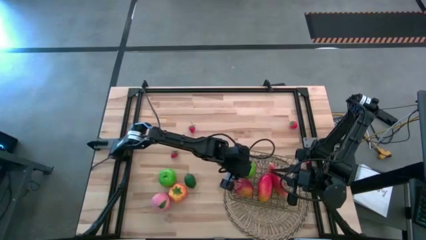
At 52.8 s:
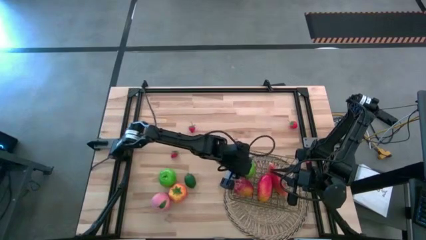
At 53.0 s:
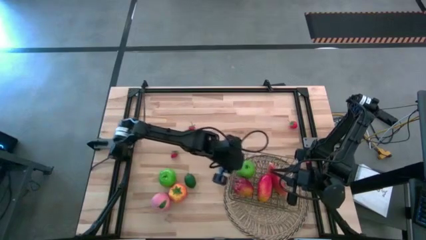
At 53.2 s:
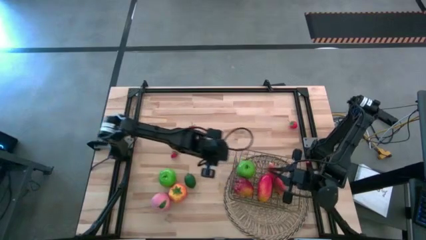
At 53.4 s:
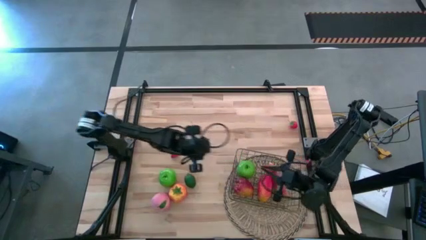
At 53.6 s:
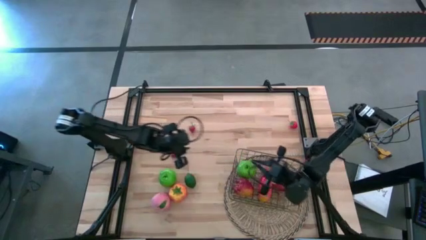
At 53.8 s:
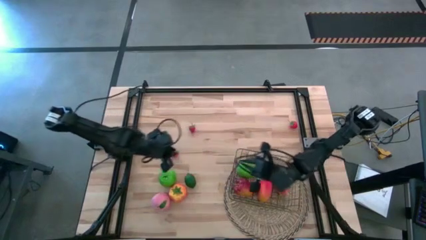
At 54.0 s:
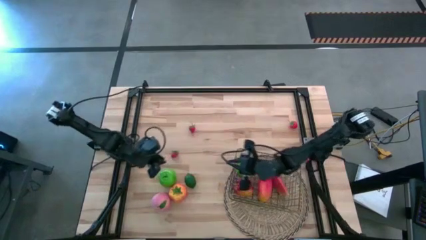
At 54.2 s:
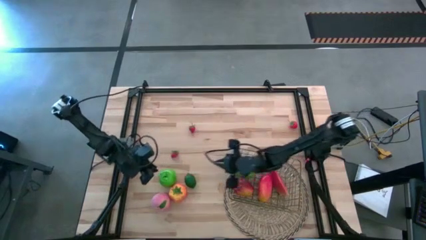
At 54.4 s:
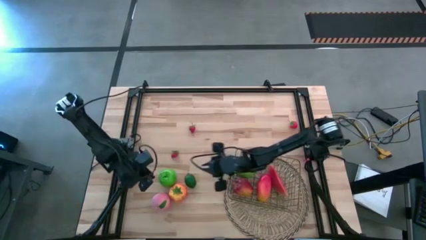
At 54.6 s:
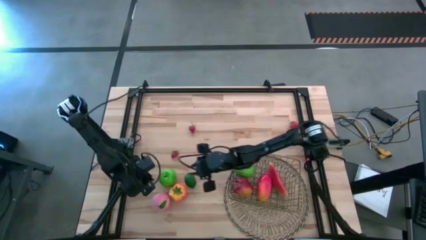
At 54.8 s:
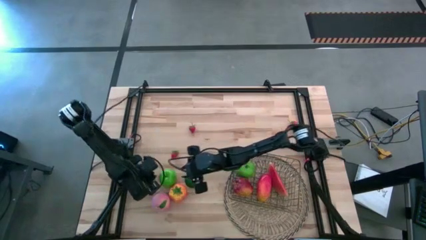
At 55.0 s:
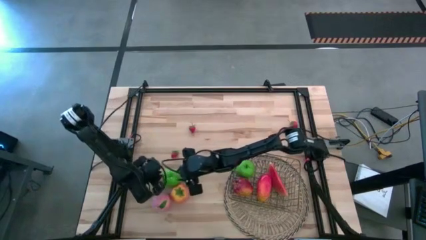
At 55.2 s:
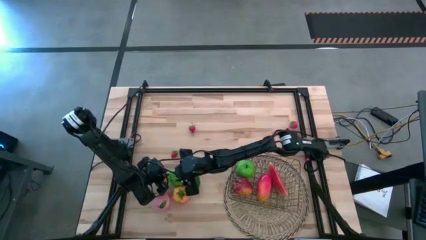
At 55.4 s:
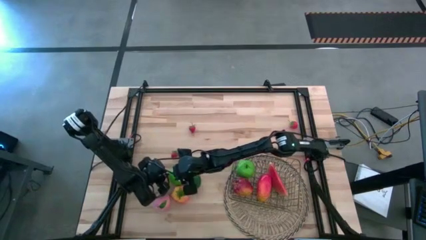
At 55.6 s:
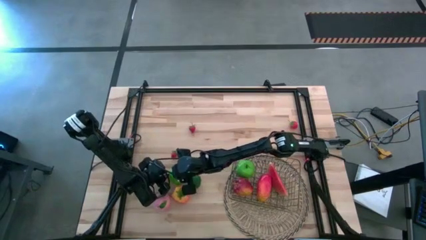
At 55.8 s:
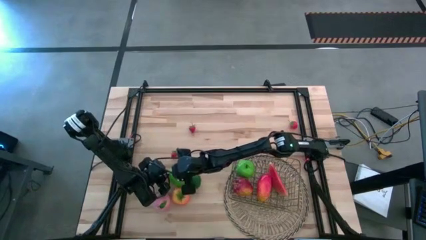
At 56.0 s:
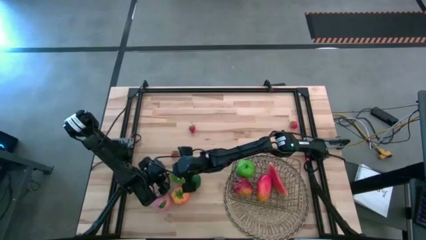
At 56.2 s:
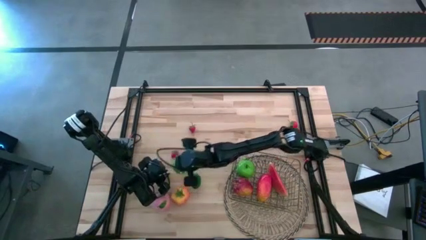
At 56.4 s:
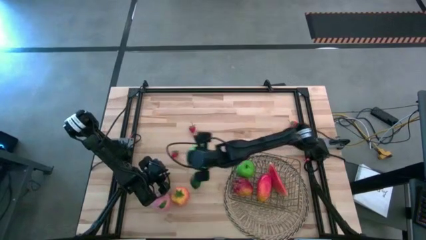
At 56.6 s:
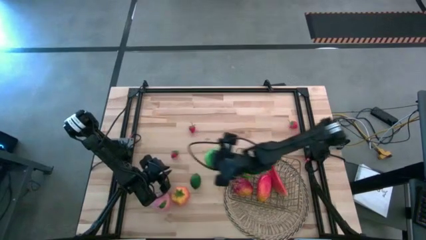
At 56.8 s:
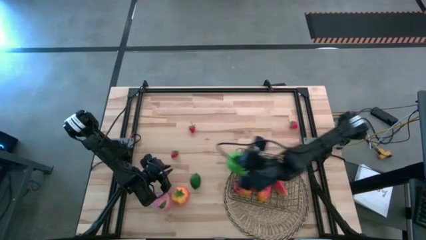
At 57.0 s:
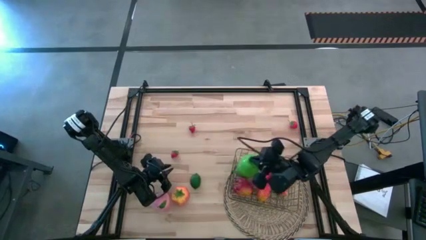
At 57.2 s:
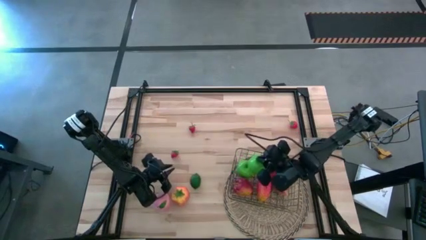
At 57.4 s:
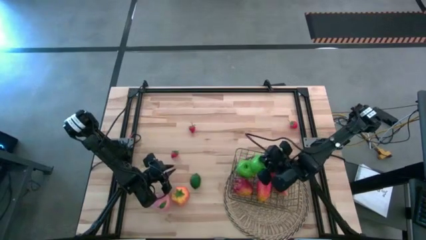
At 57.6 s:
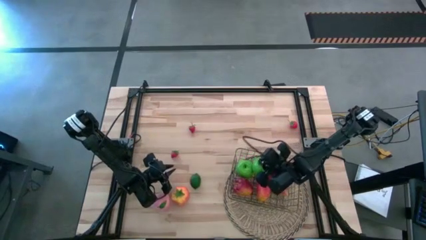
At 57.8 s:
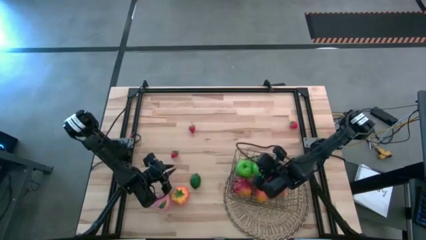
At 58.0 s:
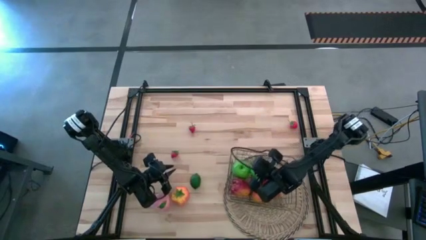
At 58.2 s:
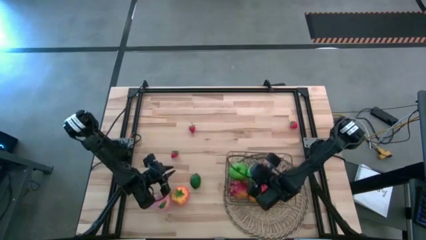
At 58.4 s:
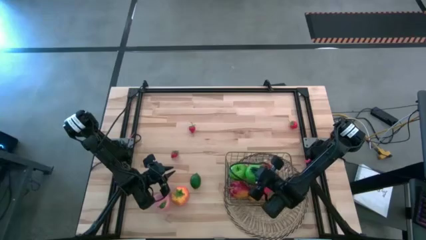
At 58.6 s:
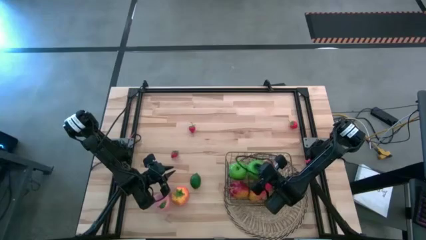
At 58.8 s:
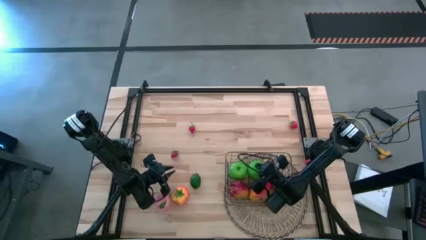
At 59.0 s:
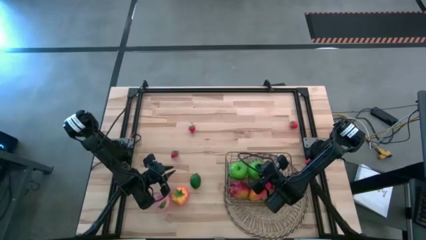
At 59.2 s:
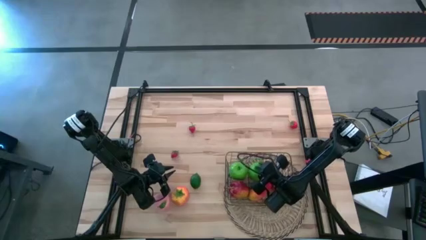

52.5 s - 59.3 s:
Task: Build produce basket
Put the green apple into the wire basket

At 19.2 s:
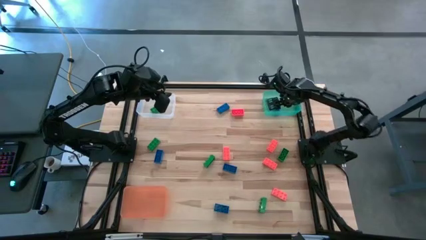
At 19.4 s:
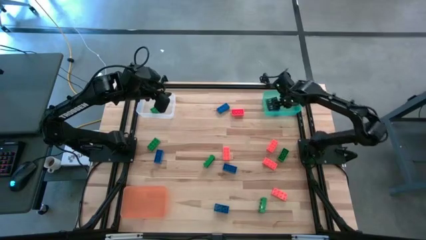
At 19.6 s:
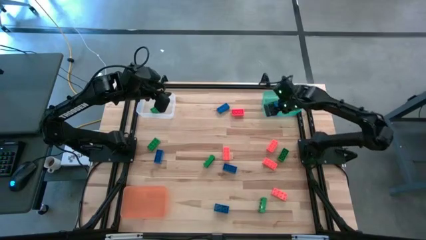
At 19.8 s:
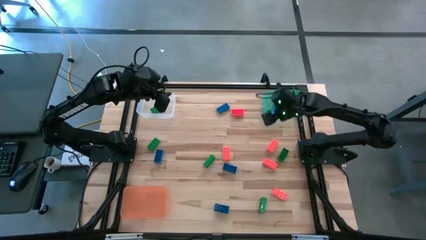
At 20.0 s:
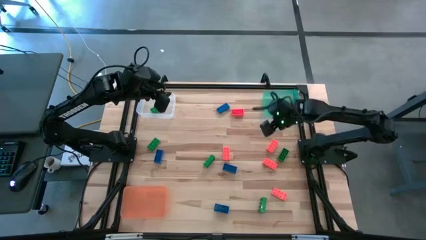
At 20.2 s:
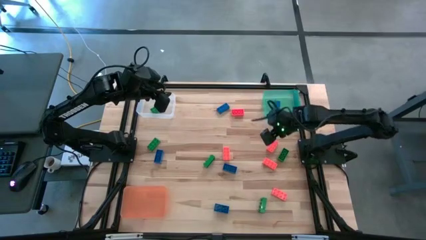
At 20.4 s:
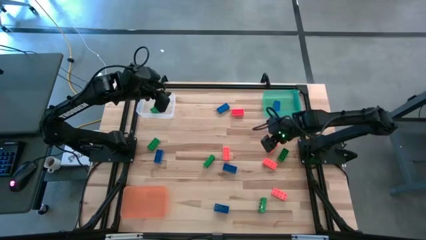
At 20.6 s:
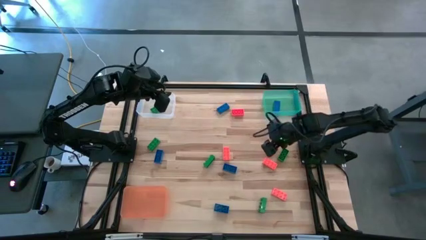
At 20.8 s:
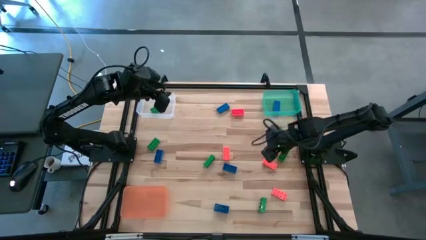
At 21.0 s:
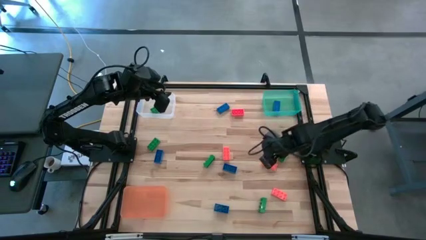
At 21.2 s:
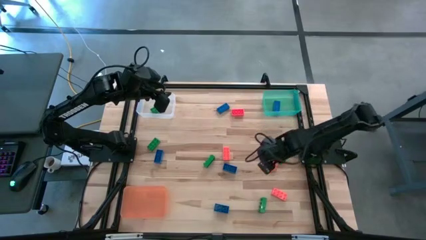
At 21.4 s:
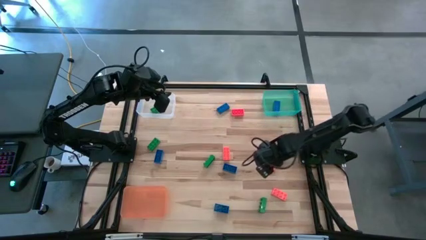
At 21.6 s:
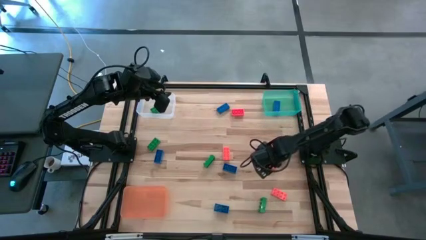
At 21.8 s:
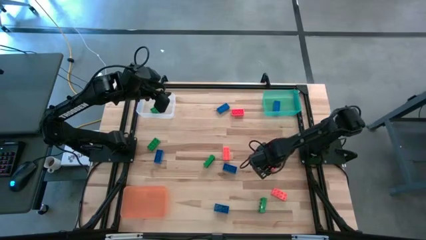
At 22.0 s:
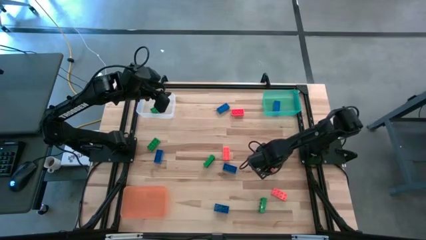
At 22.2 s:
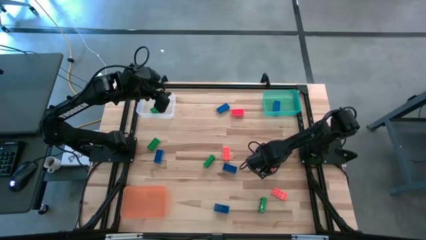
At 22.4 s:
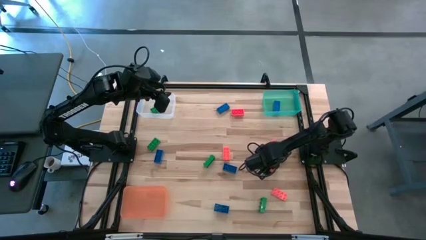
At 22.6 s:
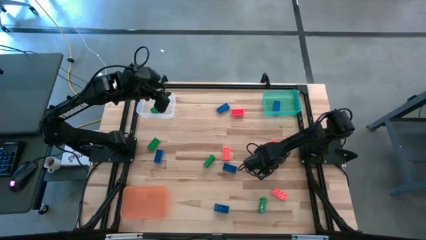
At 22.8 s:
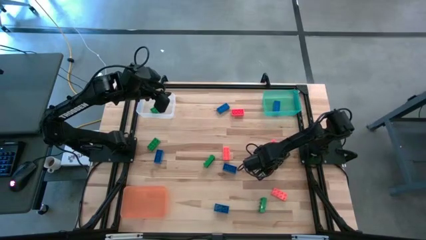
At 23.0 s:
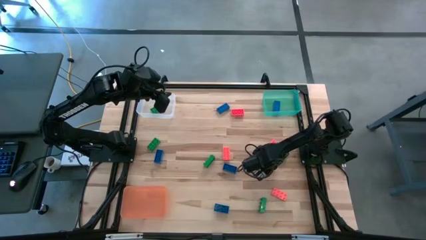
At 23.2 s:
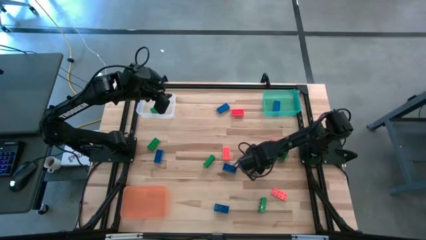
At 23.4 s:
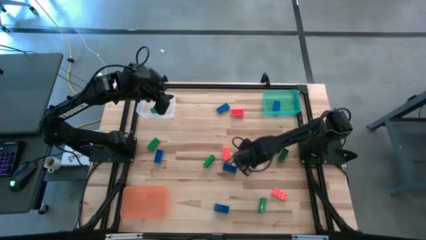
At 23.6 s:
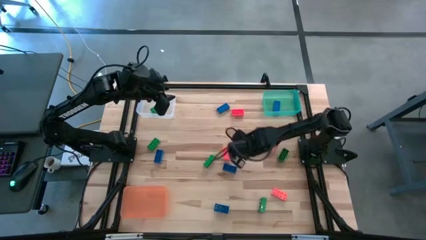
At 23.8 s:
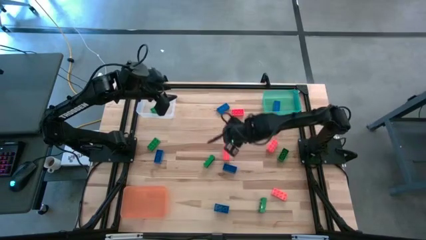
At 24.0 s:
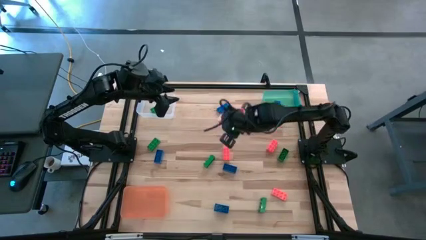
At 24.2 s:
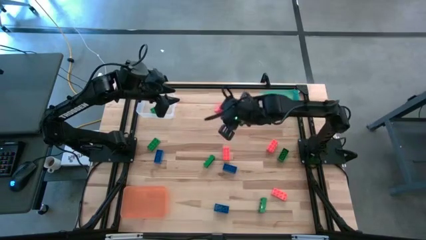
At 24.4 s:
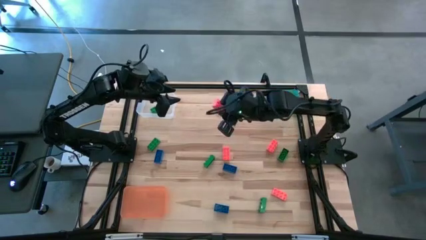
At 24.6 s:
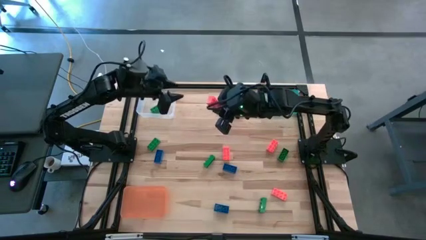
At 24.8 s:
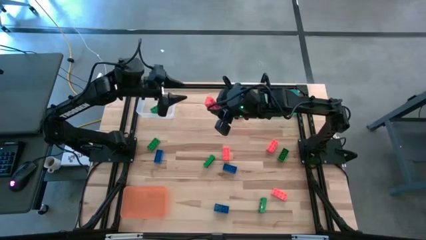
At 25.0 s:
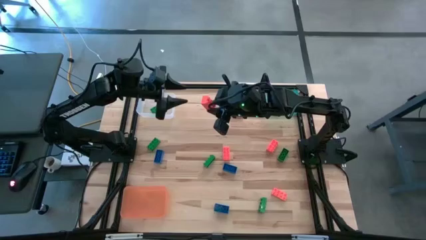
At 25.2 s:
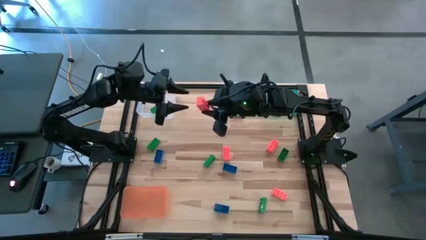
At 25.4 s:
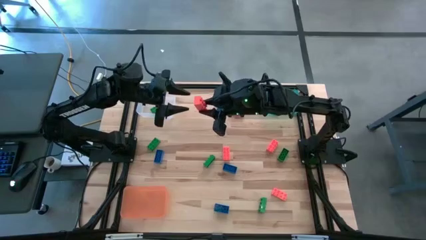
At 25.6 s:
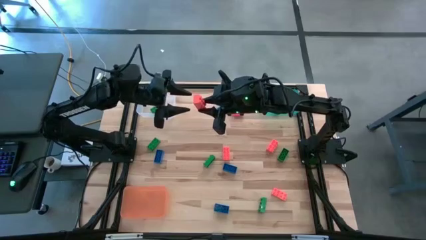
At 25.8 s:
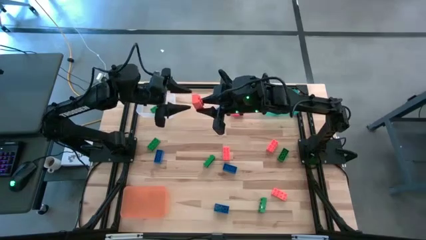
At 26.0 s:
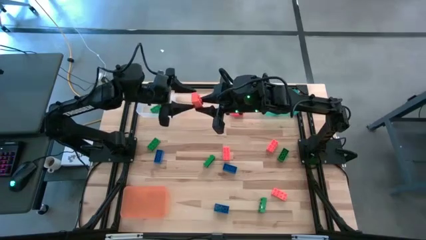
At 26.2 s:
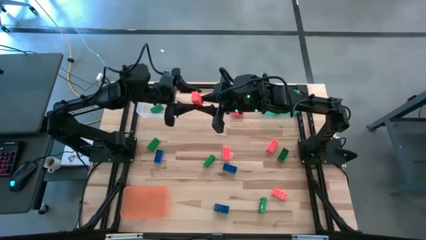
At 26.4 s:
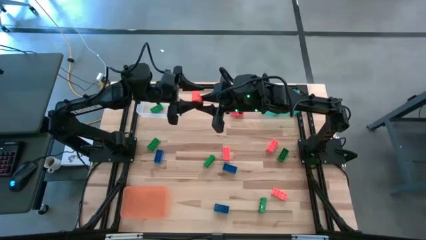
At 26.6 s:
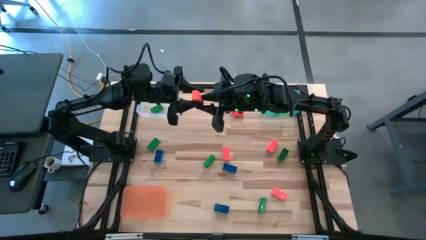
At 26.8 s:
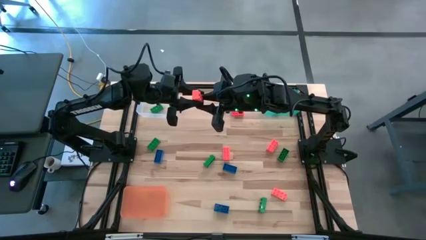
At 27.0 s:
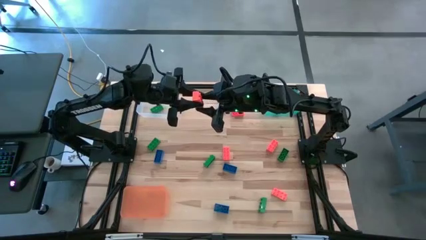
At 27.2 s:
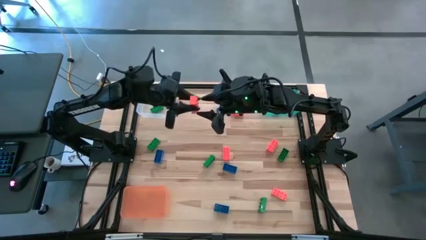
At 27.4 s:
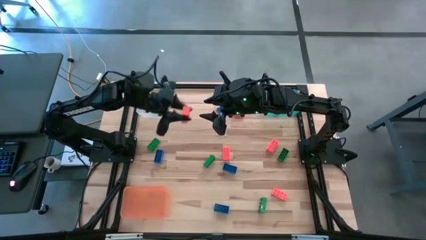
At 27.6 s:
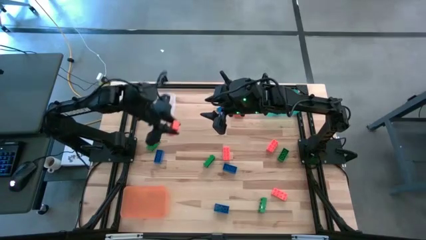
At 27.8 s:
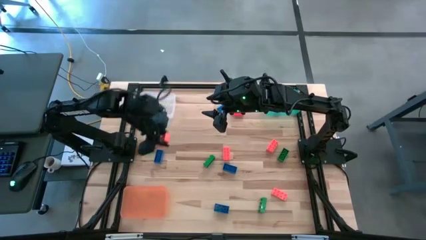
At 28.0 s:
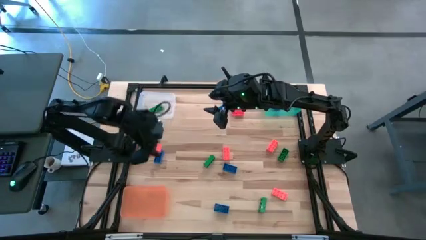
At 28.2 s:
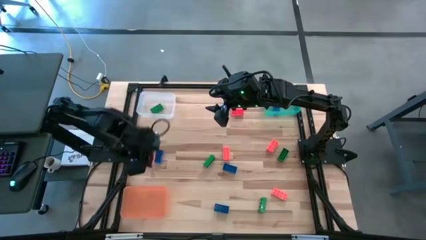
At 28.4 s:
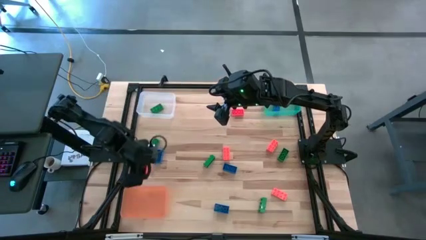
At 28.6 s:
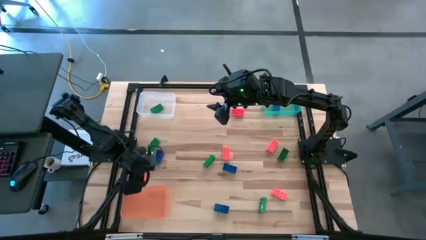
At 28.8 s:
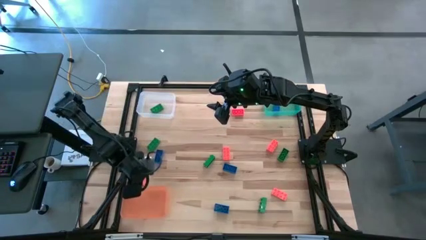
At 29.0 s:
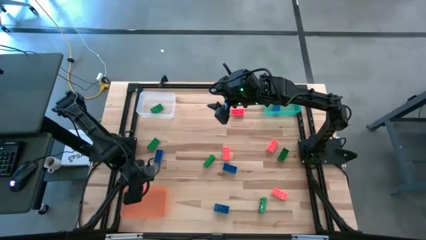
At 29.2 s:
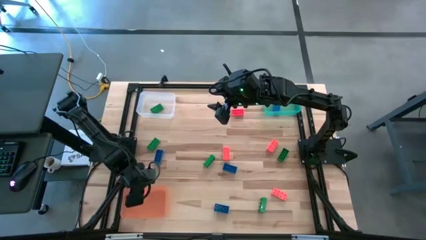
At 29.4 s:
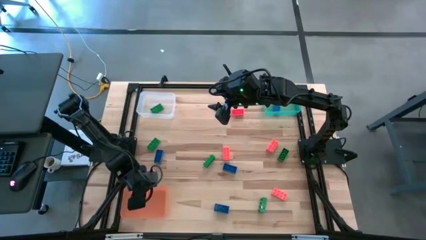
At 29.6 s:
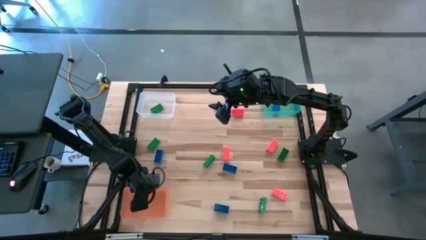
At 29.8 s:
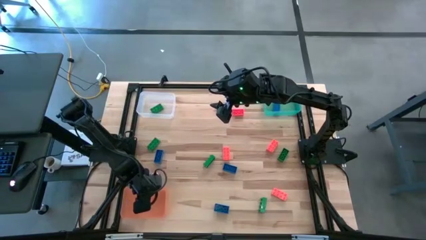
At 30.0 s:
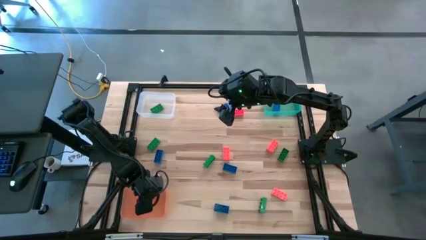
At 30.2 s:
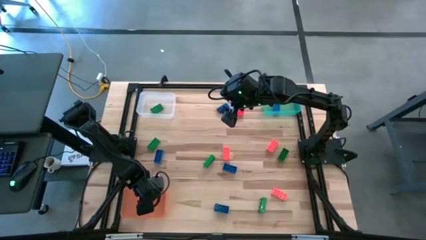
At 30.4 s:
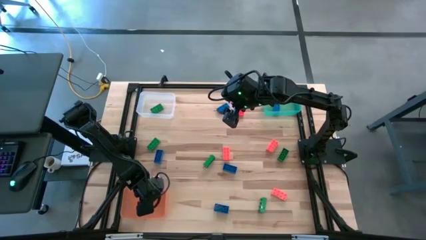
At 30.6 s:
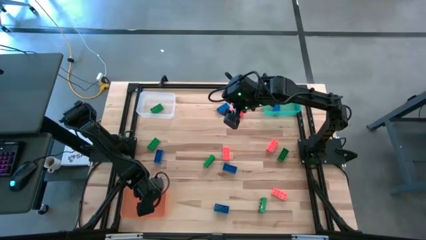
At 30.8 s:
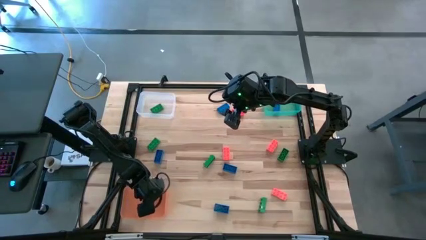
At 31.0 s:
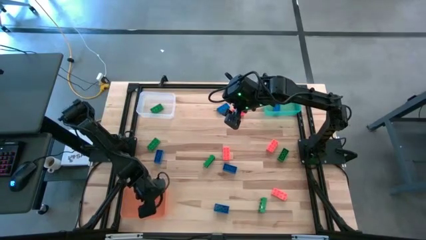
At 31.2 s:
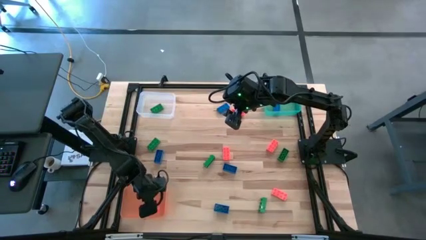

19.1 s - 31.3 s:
Task: Sort & place blocks by color
Put the orange game piece into the orange bin
